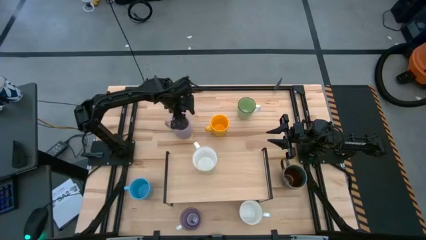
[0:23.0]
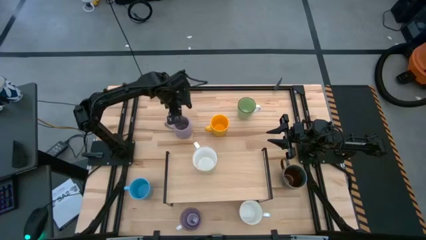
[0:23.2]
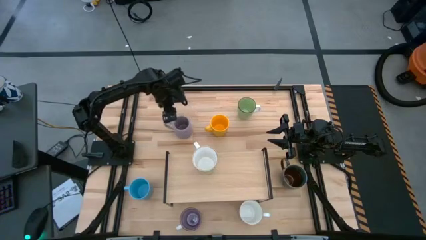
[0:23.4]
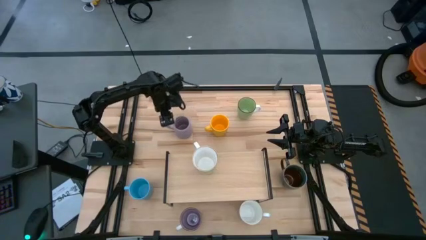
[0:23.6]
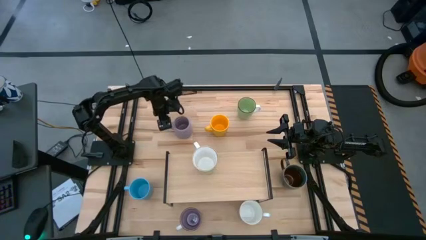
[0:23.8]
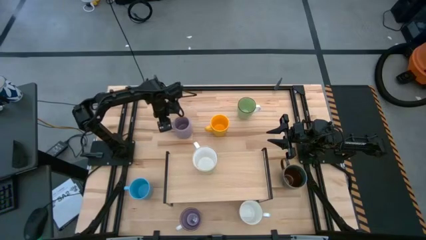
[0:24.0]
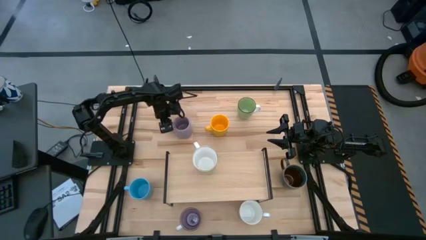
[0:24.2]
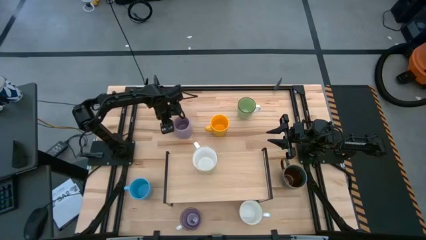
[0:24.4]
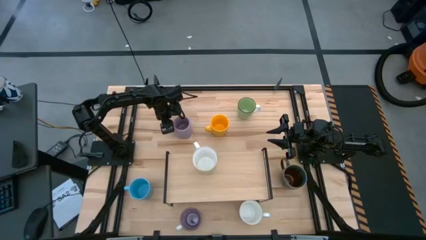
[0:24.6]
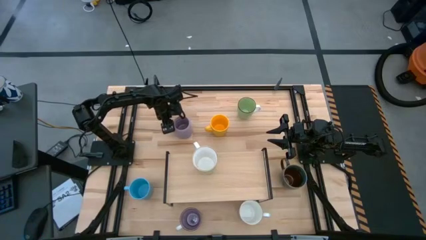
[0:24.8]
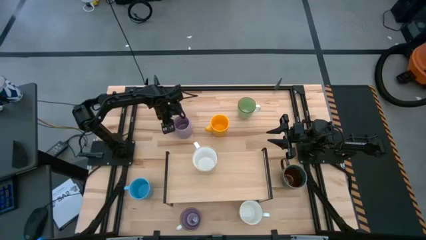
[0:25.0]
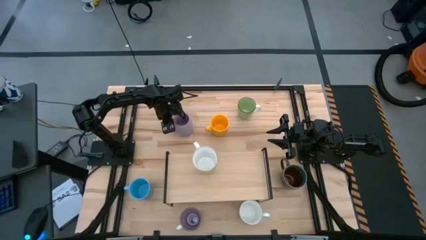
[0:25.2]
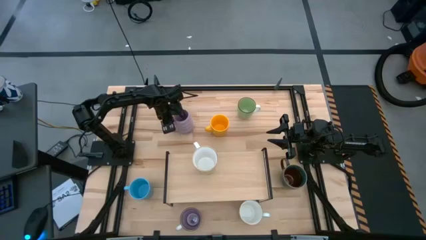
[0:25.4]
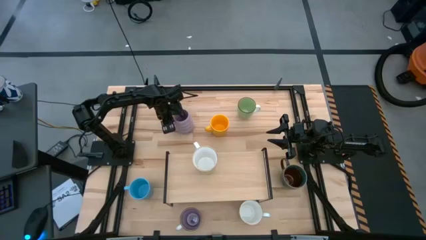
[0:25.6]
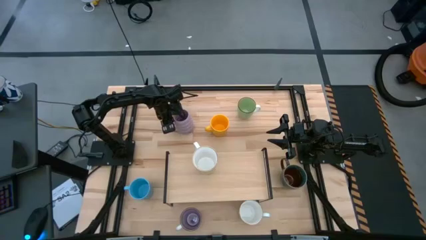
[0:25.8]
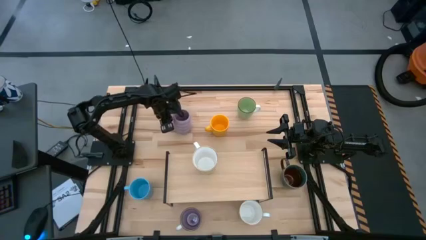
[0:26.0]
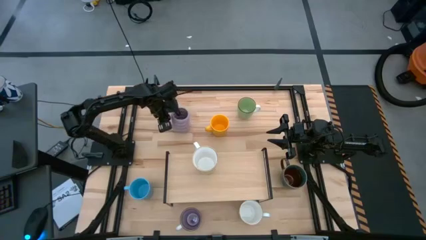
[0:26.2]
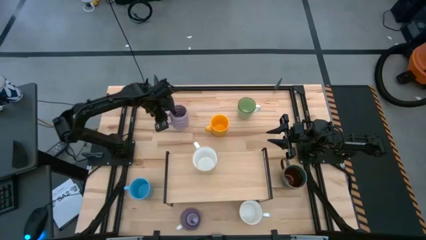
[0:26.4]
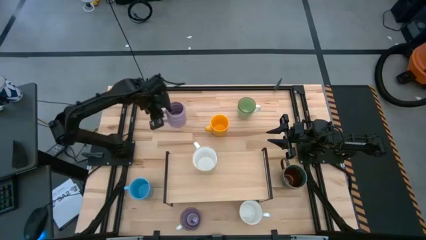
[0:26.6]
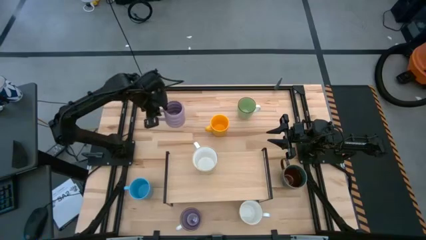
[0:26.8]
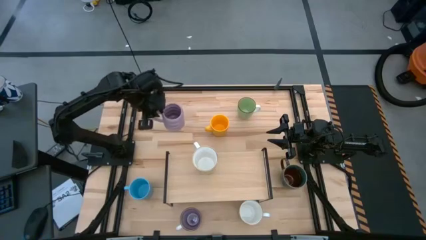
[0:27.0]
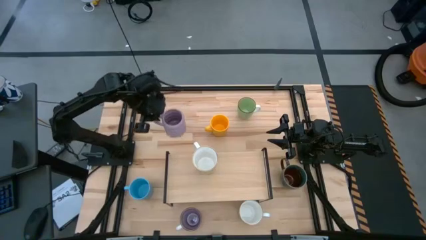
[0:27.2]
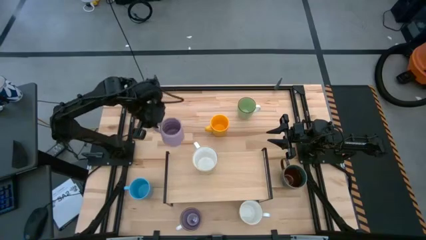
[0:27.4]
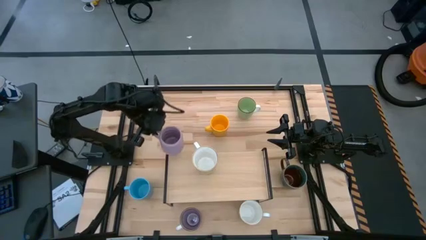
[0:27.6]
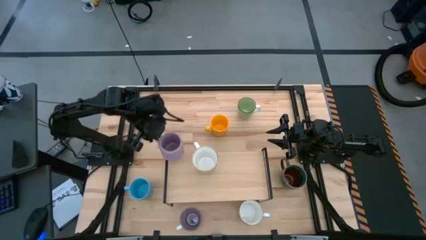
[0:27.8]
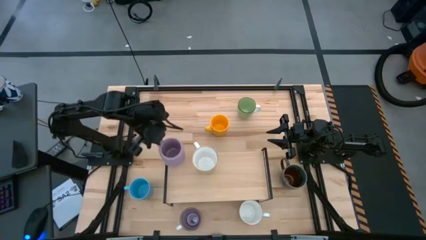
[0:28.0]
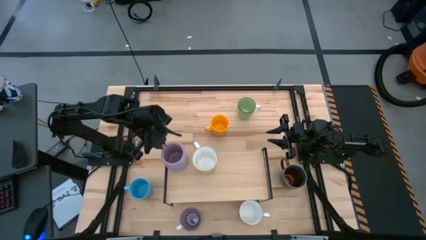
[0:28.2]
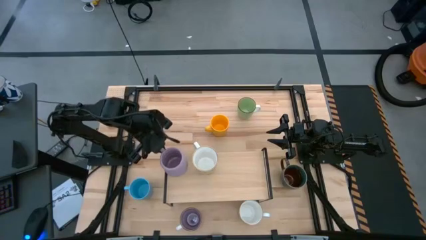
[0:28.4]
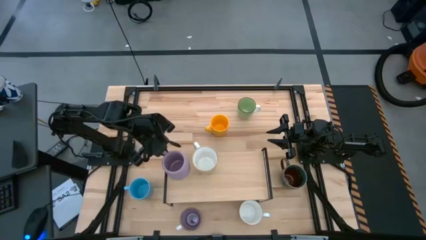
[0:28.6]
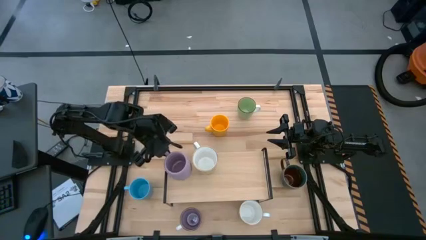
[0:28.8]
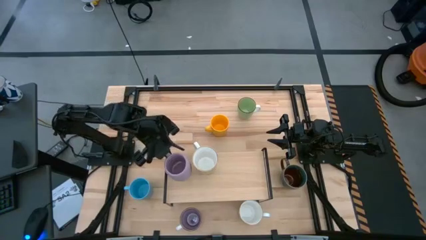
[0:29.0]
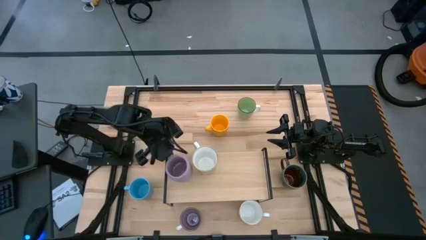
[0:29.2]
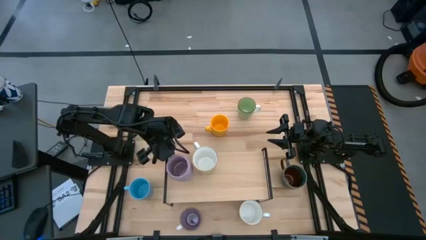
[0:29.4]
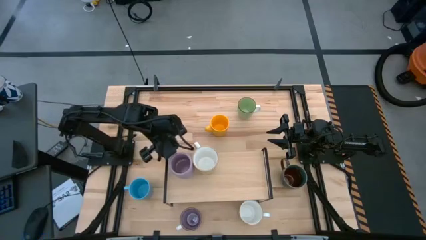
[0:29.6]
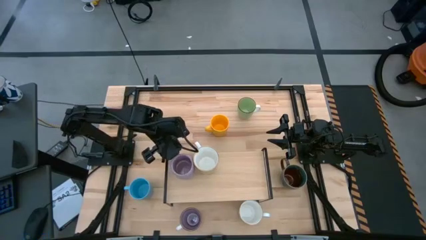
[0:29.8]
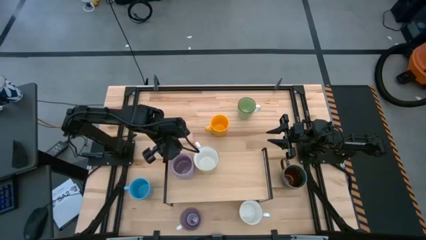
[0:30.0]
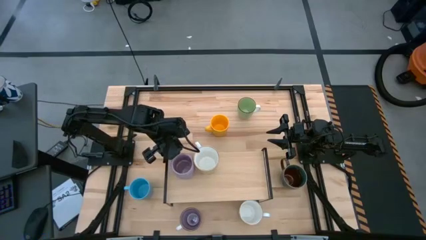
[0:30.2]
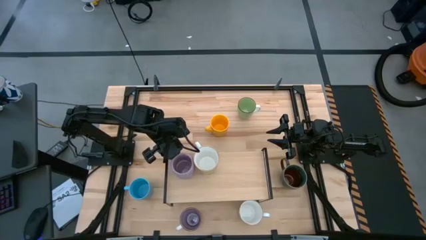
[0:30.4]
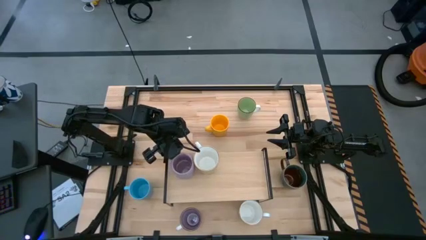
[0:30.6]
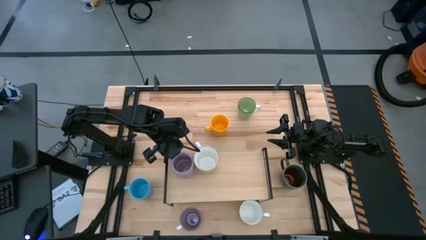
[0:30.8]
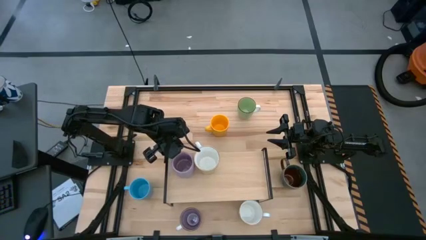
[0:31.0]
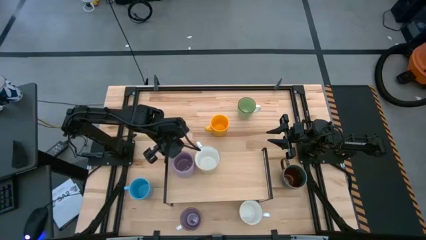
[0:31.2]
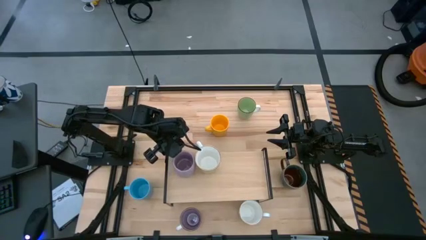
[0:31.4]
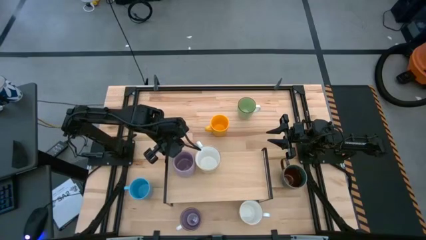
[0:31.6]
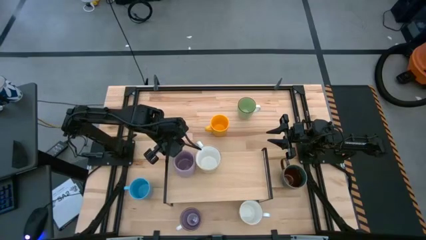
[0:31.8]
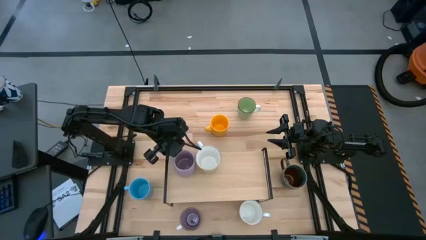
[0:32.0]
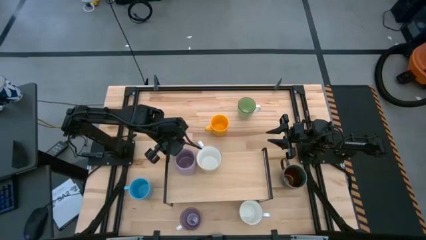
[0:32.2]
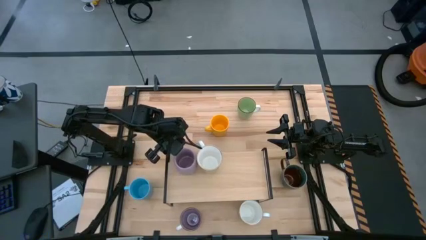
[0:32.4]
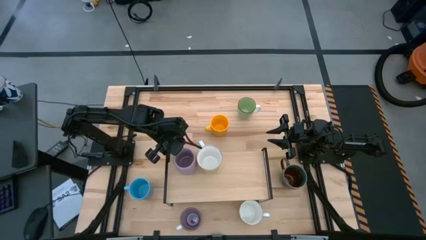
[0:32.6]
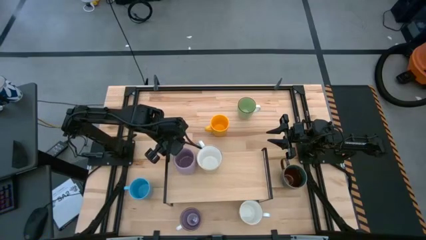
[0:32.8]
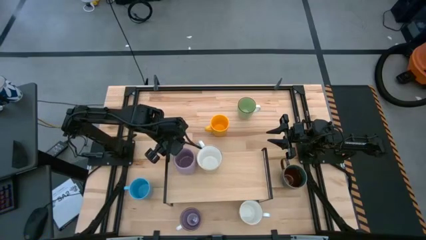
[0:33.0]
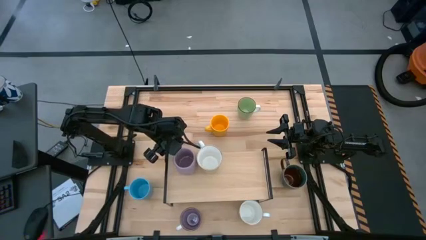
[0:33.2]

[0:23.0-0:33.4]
Task: Place coffee mugs
Put the purple mug on the shelf

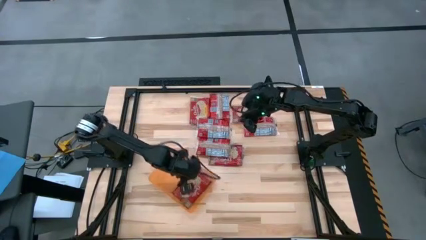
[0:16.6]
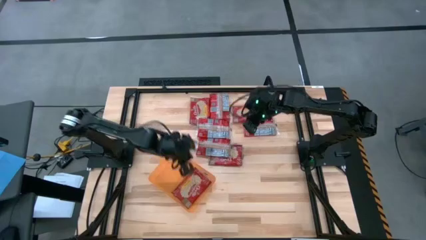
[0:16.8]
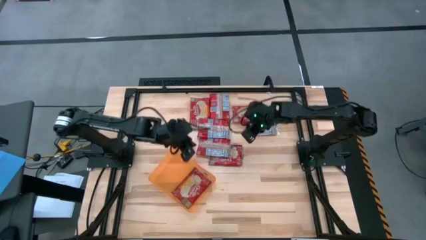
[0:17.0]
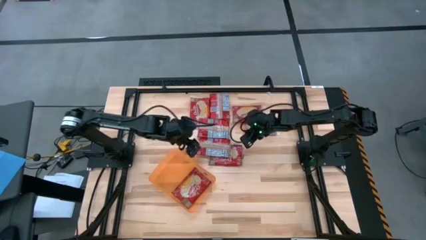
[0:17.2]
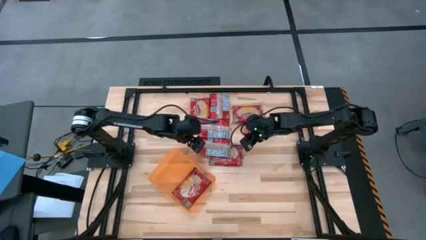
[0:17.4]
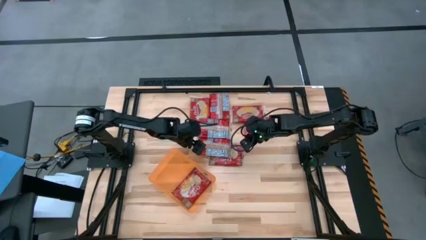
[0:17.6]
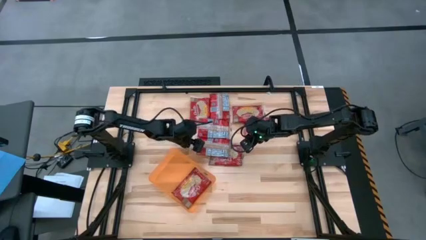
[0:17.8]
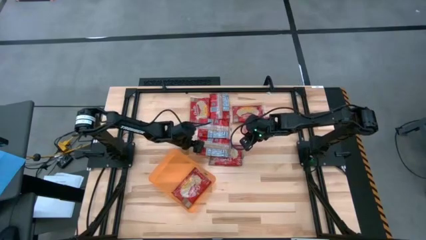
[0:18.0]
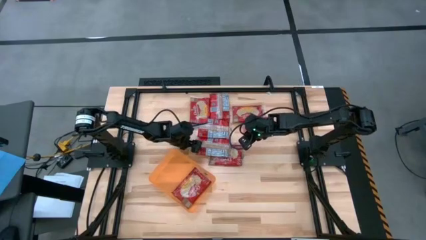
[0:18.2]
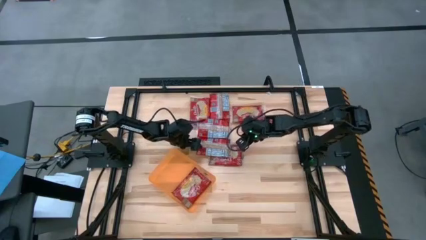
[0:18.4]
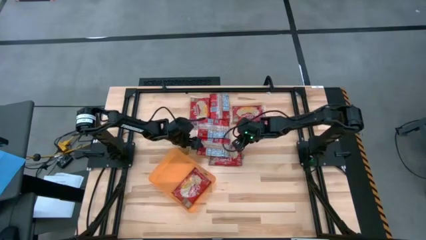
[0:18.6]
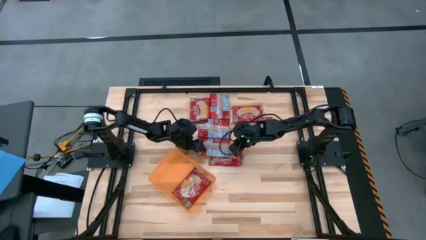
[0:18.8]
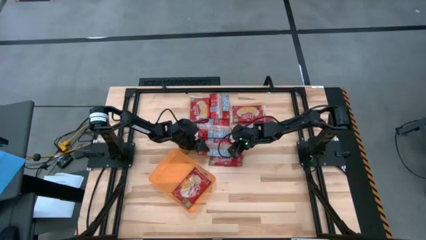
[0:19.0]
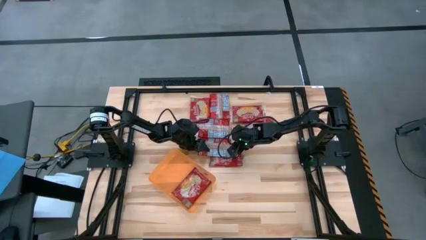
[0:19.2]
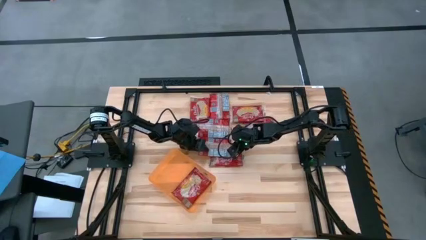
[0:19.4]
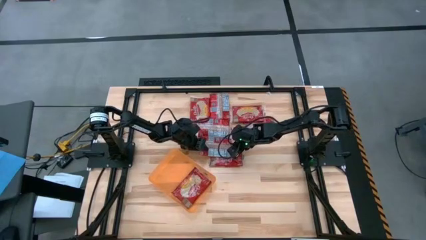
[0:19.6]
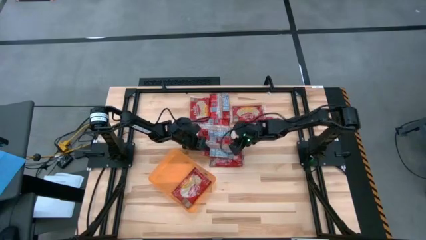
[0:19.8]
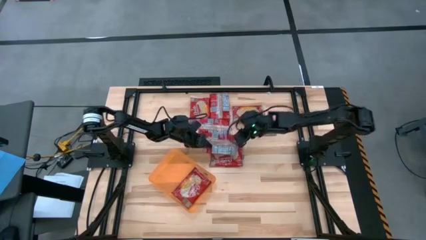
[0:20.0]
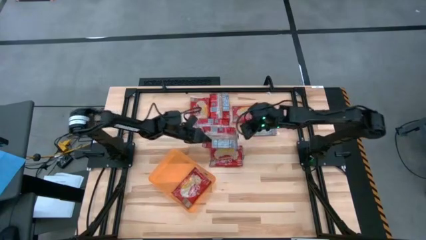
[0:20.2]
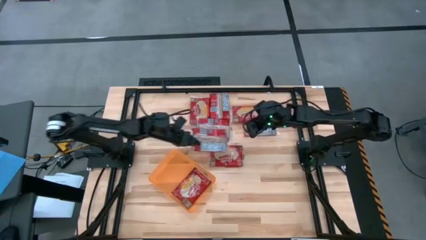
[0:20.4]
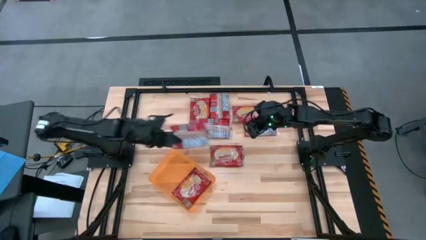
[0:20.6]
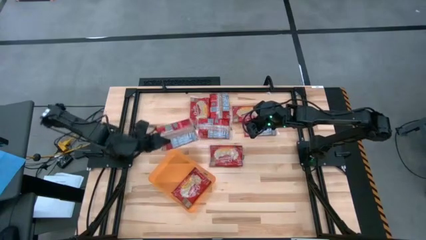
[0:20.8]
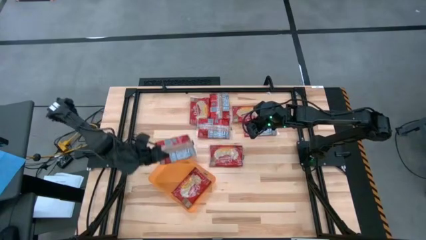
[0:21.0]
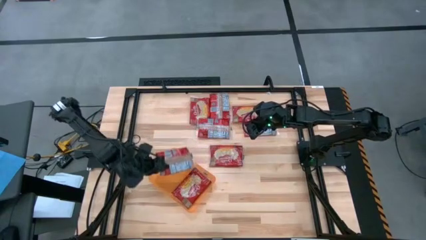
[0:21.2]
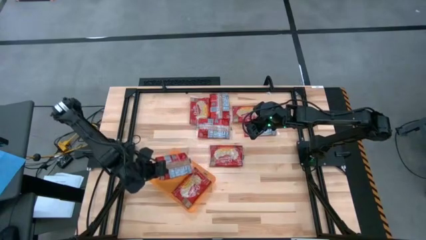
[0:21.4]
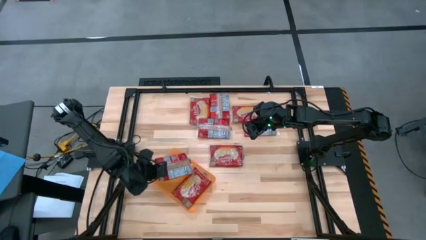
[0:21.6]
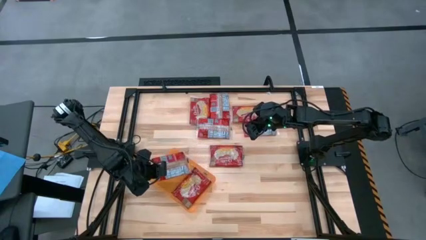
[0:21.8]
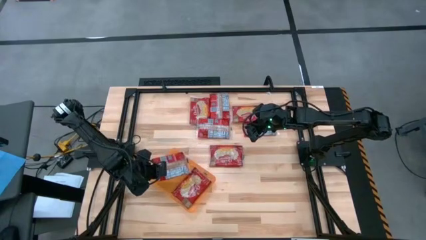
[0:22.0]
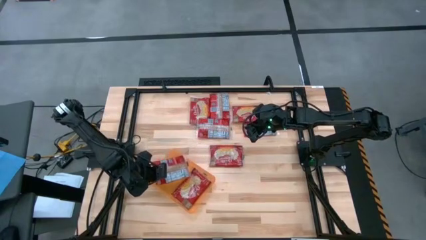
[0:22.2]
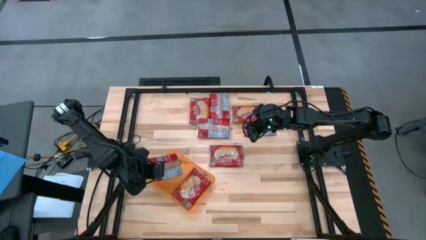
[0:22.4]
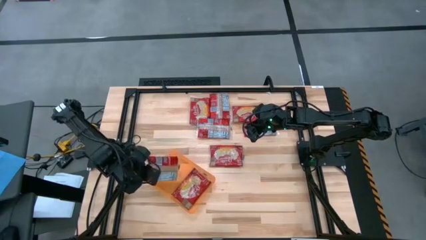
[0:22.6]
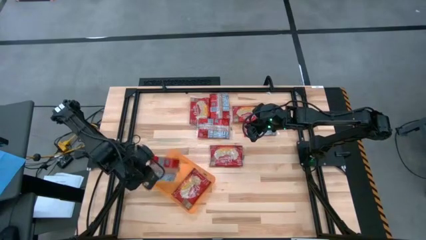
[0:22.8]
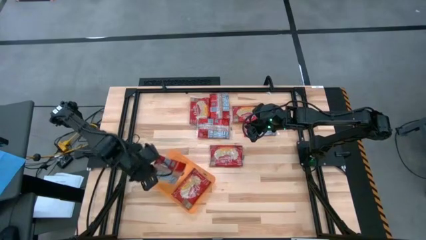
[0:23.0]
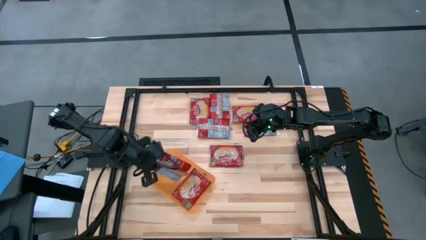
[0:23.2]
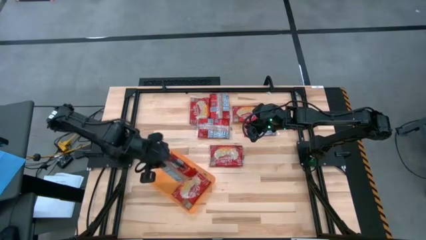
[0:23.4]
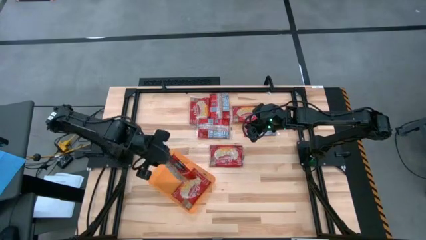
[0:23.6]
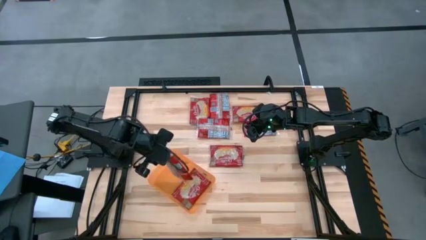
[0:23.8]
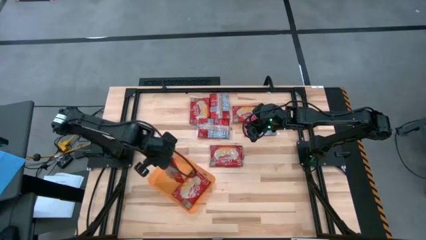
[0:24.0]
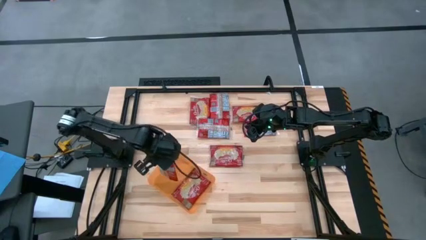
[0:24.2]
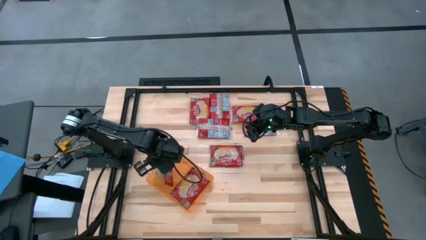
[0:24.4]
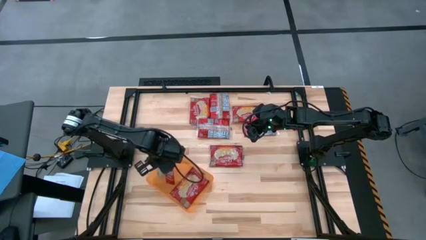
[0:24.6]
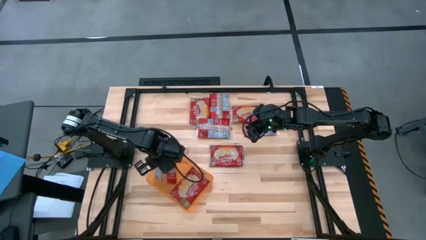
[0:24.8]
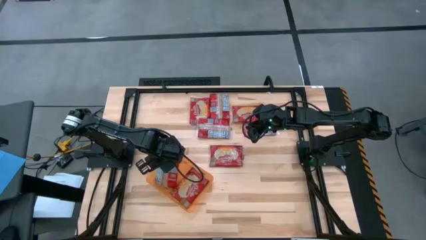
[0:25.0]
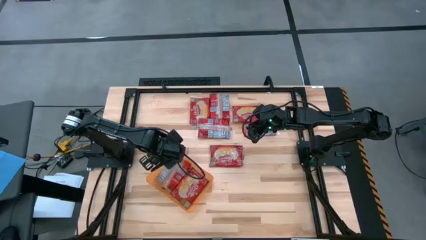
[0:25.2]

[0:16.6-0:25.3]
Task: Sort popcorn bags into baskets
Put the popcorn bag into the orange bin
